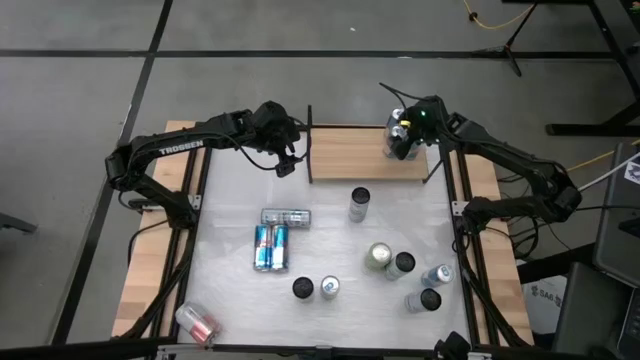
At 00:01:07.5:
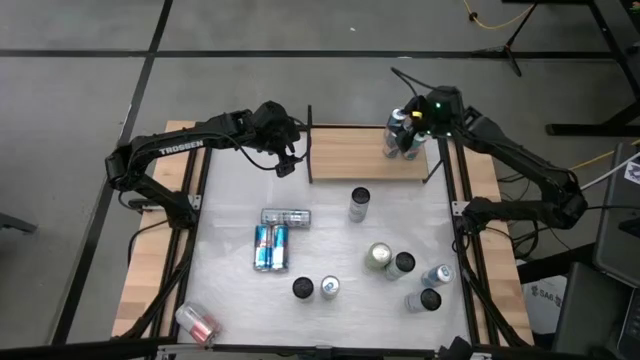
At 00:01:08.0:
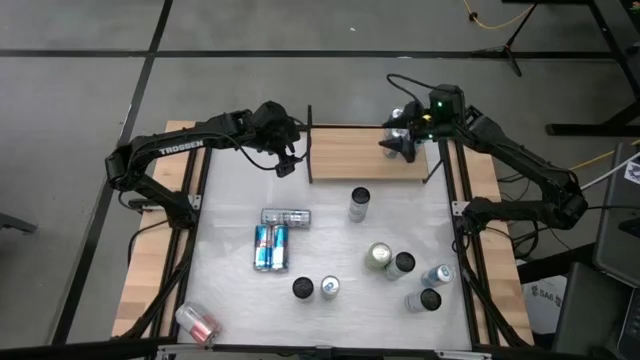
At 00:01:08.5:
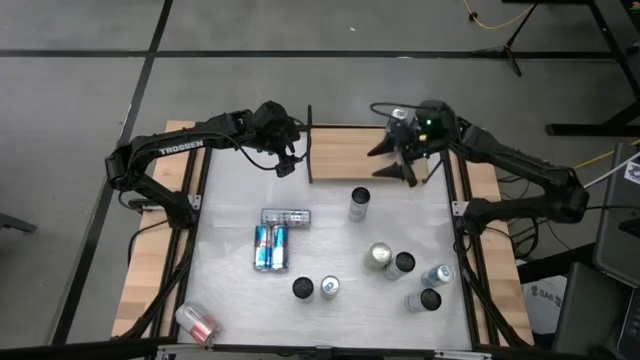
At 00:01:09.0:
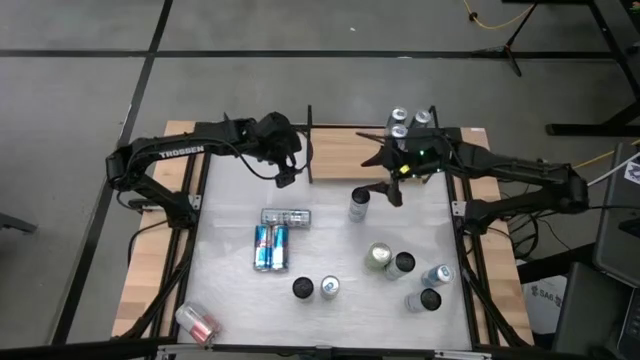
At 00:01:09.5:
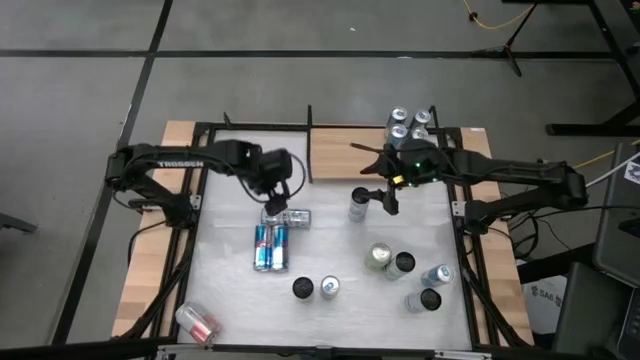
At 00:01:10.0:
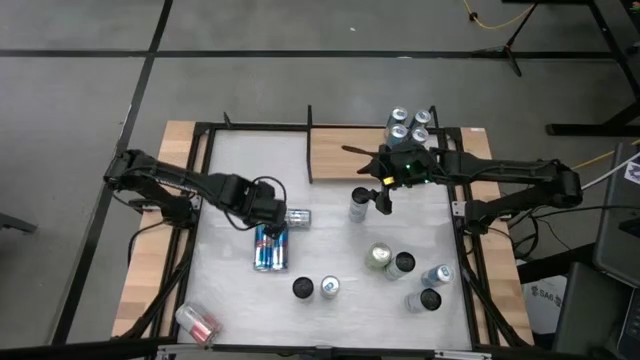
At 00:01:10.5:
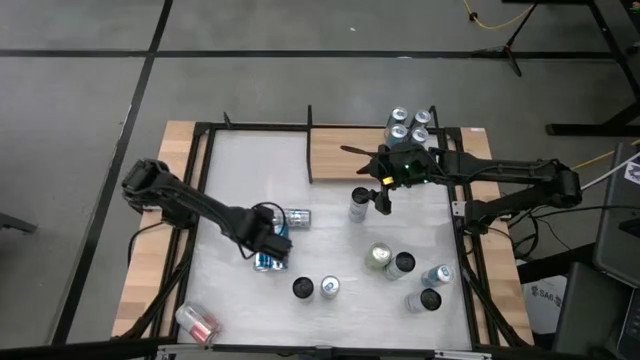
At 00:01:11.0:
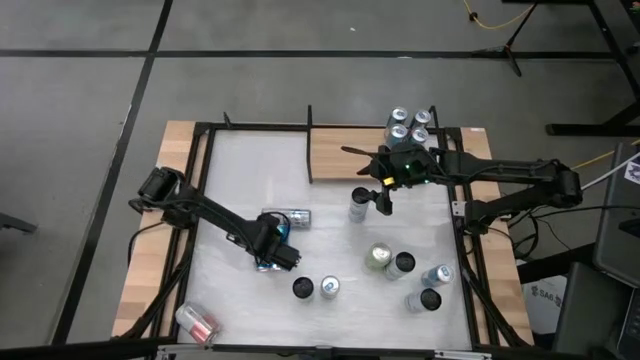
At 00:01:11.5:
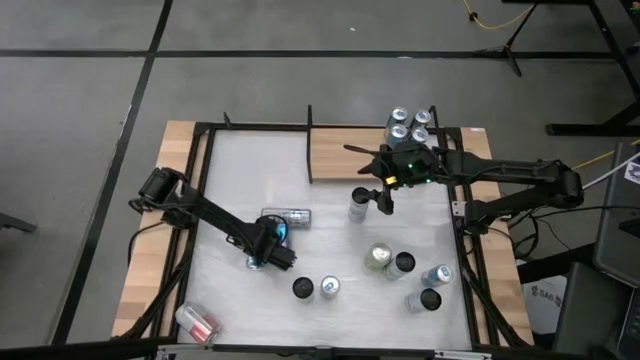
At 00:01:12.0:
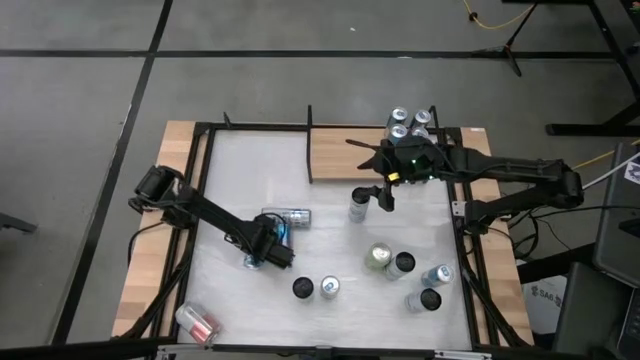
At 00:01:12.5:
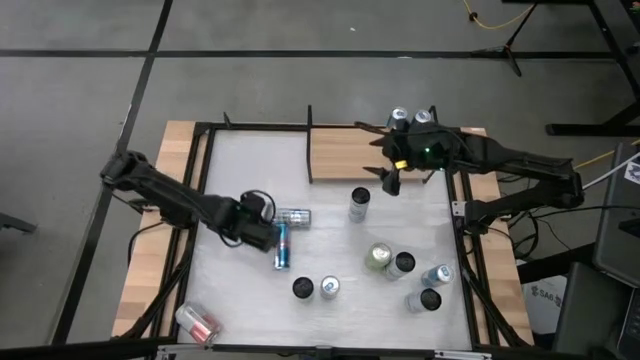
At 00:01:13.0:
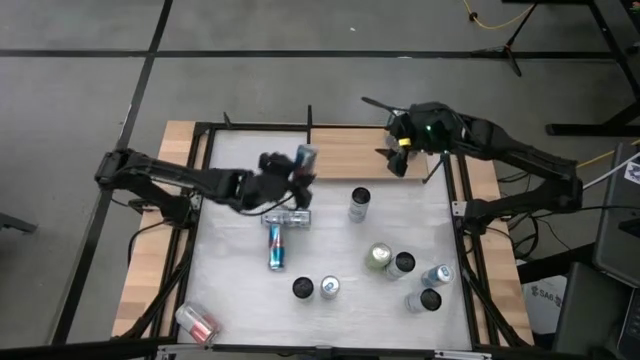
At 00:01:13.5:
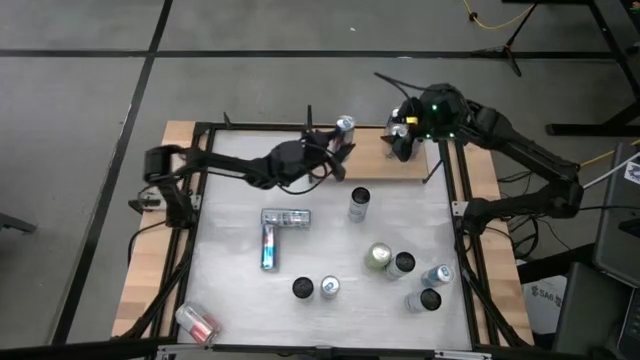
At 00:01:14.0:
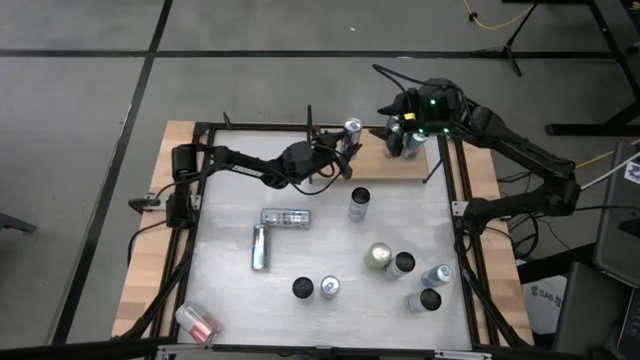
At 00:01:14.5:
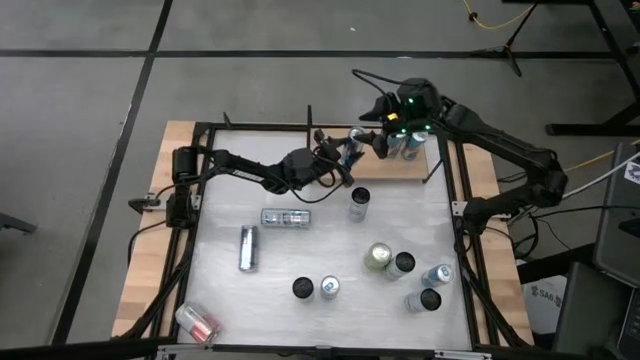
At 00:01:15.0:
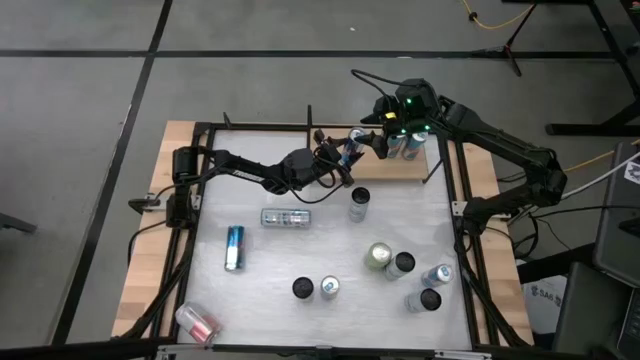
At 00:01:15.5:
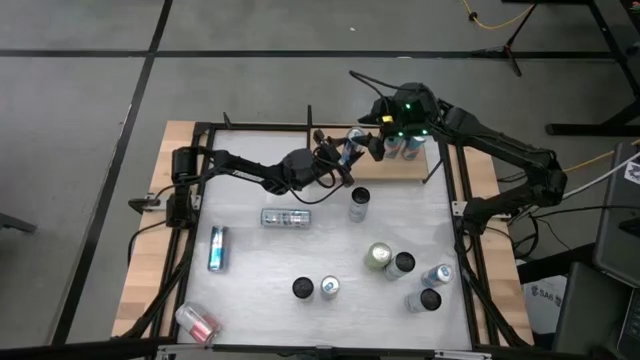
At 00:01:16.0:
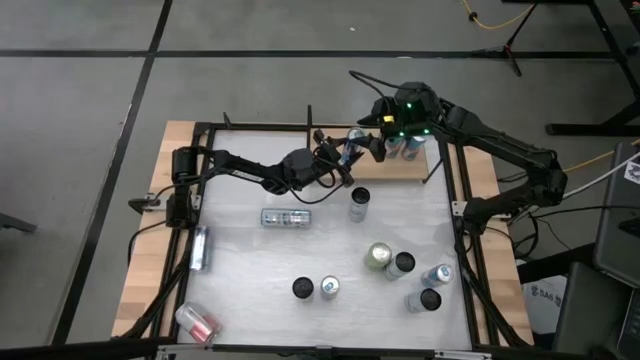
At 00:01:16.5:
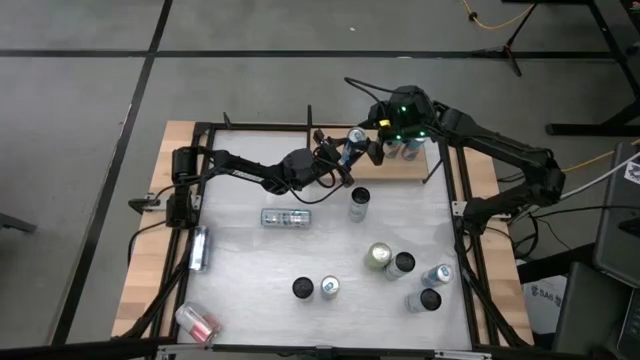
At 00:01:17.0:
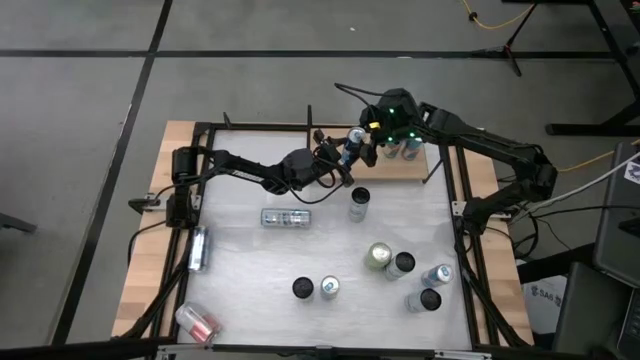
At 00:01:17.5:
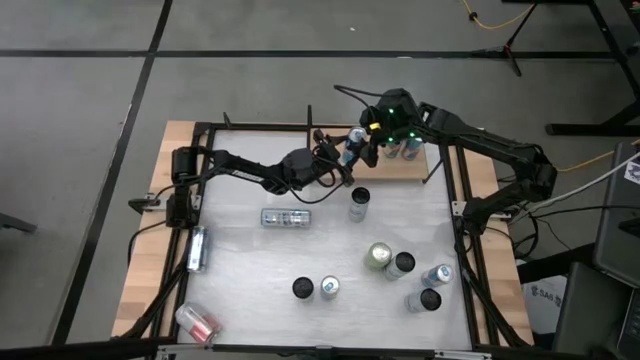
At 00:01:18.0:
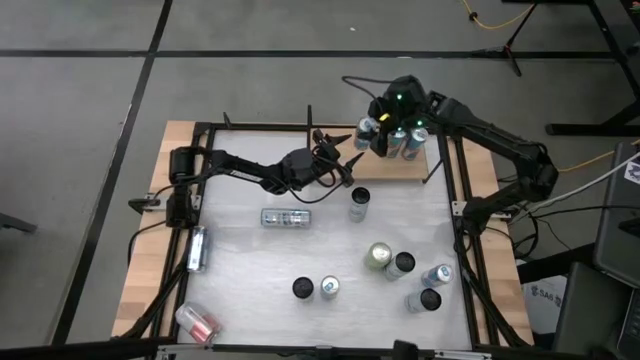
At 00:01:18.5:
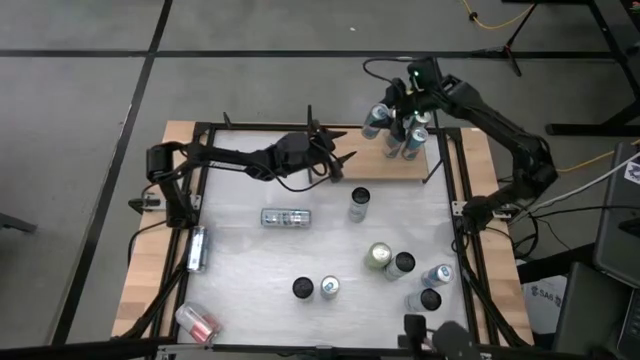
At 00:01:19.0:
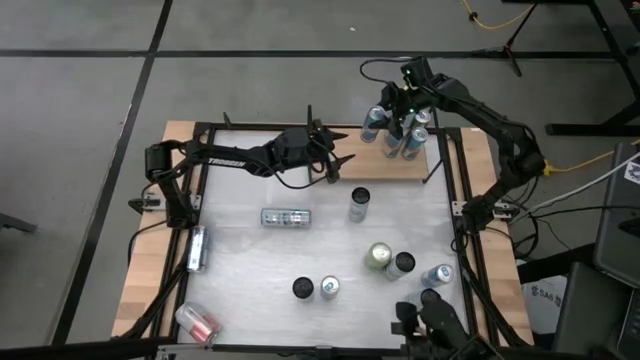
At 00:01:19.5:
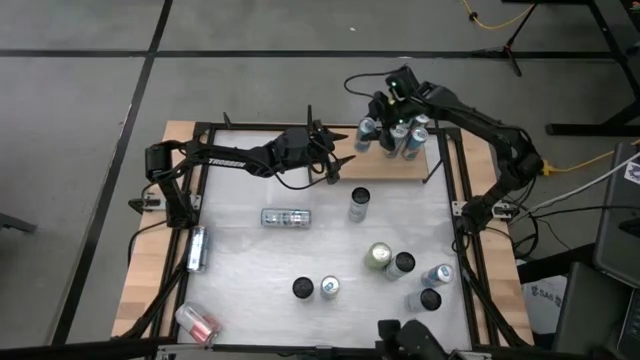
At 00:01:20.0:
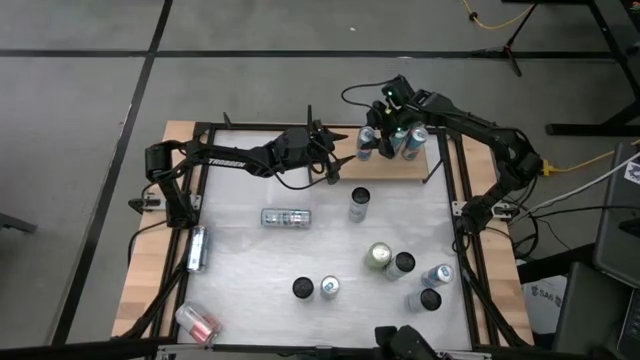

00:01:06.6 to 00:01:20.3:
Task: Place canned beverage on shelf
Put the blue soda can on the shelf aligned with the other blue soda cans

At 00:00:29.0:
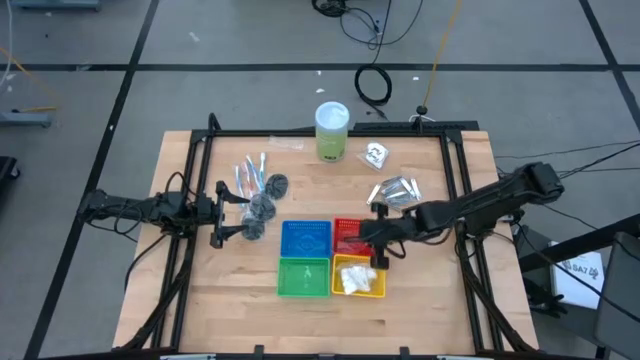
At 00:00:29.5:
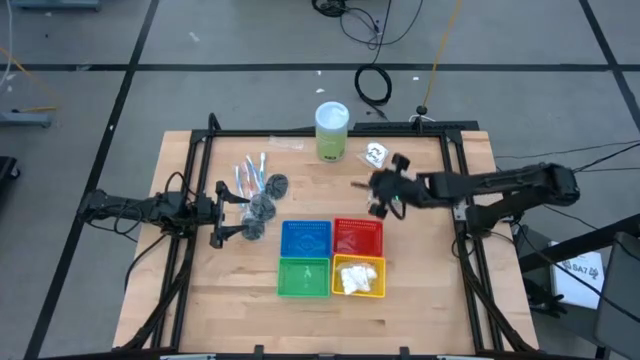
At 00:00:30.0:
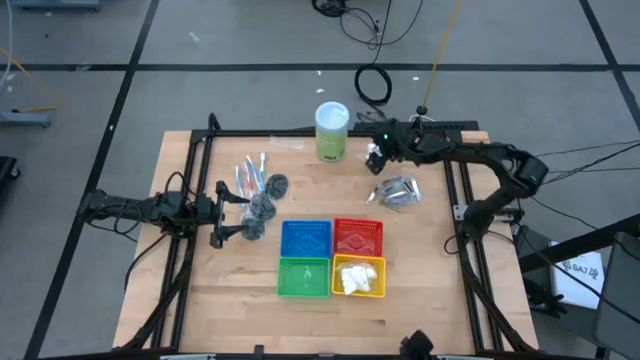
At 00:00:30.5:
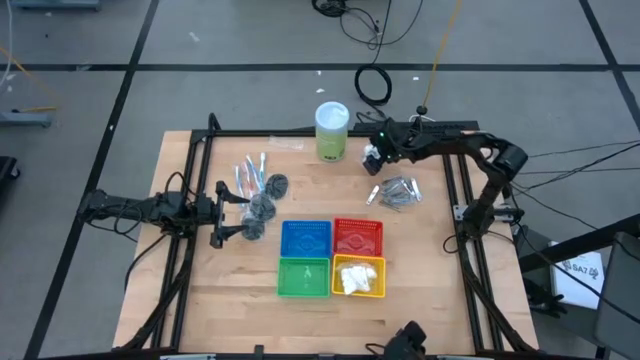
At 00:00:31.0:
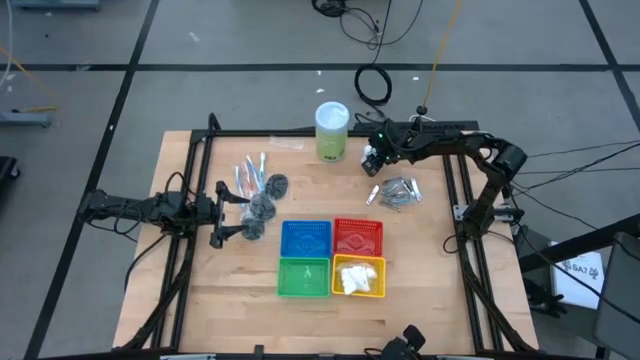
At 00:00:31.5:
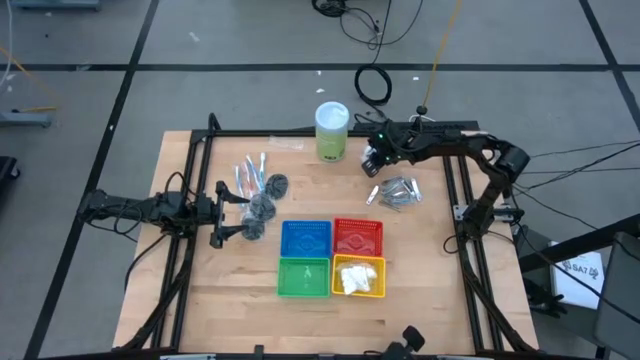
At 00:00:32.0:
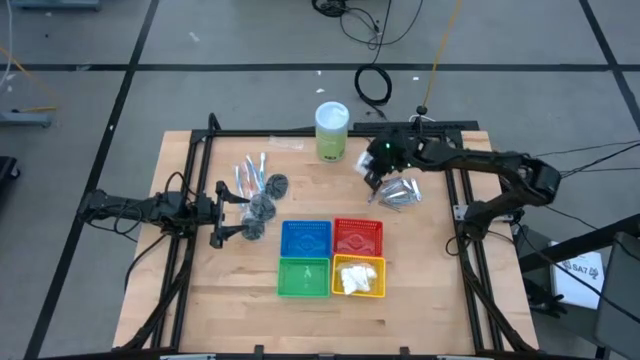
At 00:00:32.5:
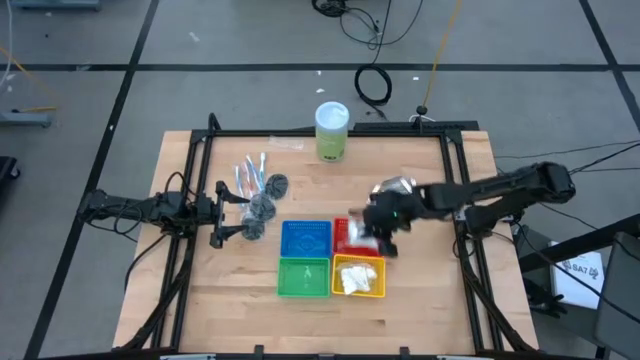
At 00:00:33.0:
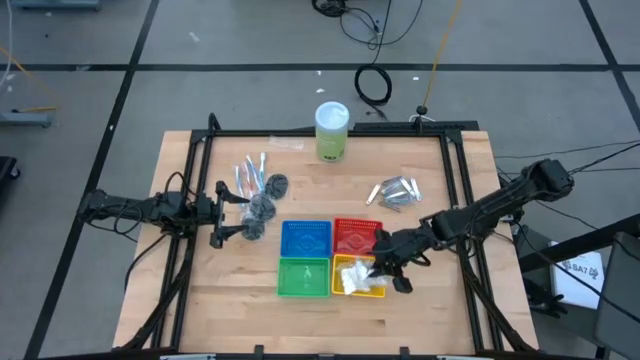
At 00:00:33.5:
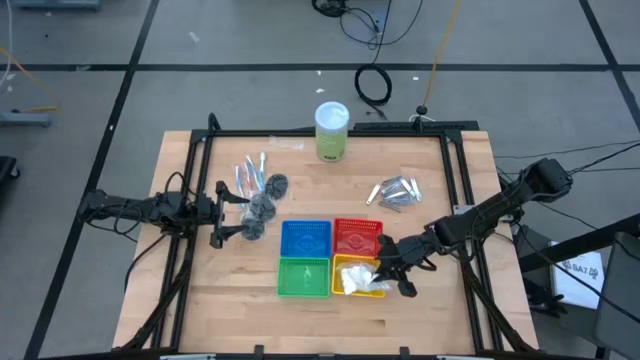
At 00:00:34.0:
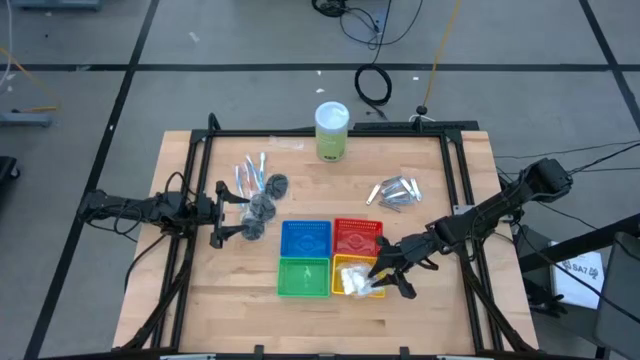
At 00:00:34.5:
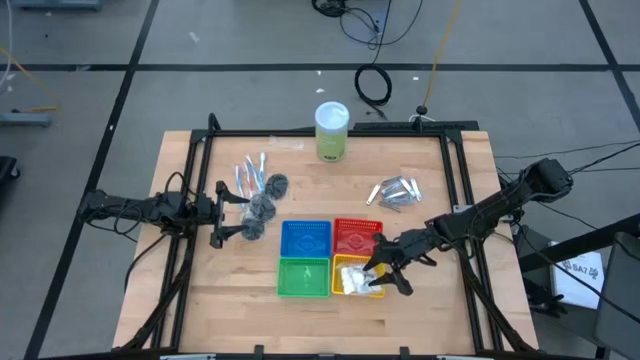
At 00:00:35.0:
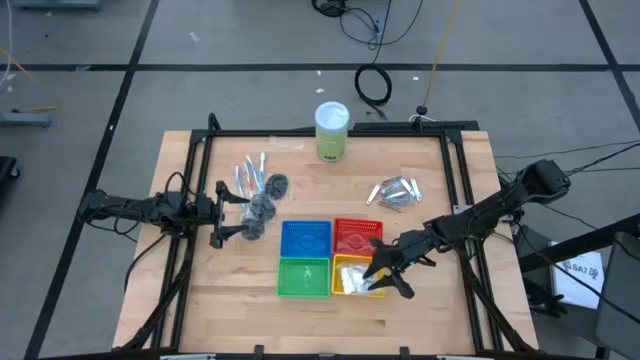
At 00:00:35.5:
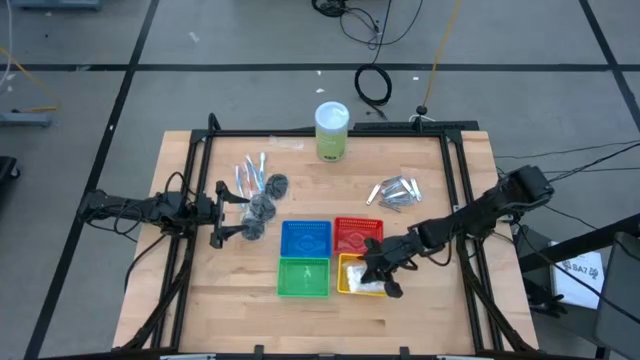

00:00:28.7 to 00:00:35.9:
Task: Pick & Place Travel size toiletries
Put the white cotton pack into the yellow basket
